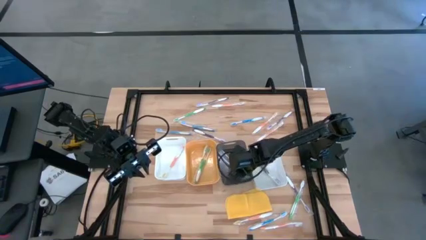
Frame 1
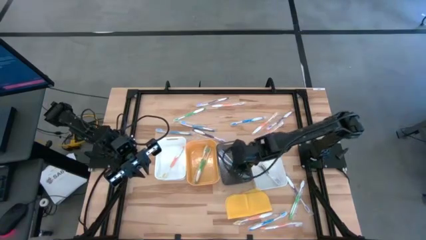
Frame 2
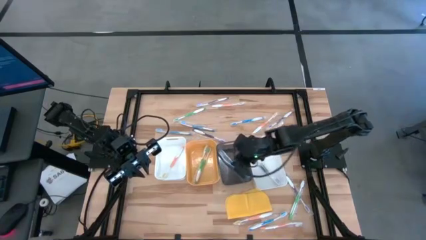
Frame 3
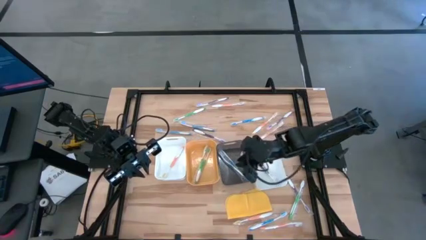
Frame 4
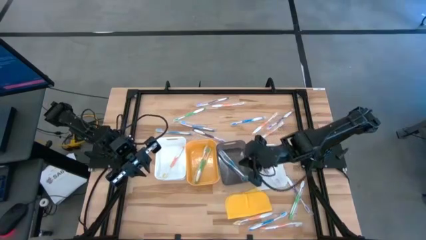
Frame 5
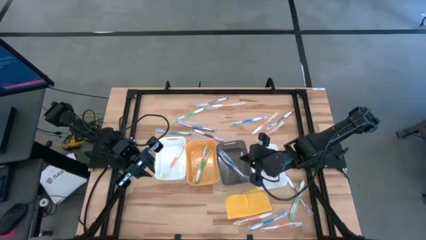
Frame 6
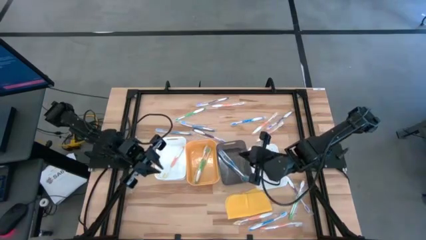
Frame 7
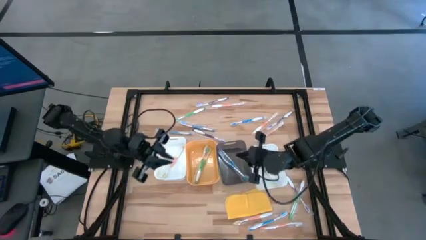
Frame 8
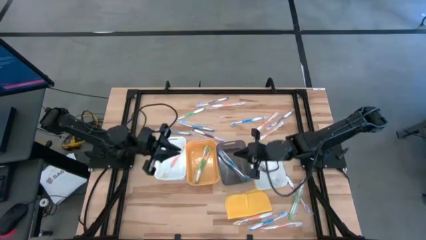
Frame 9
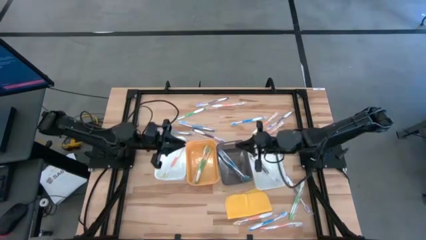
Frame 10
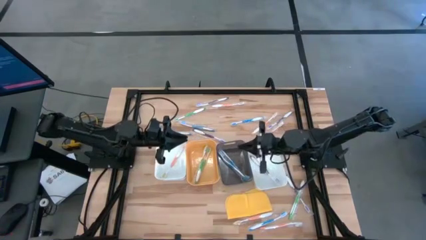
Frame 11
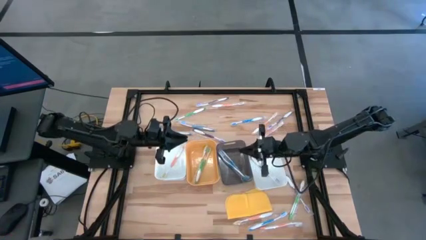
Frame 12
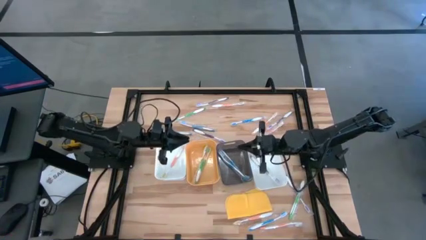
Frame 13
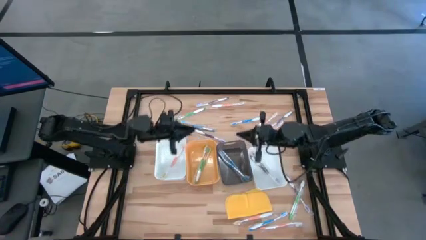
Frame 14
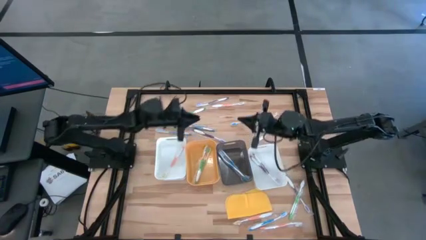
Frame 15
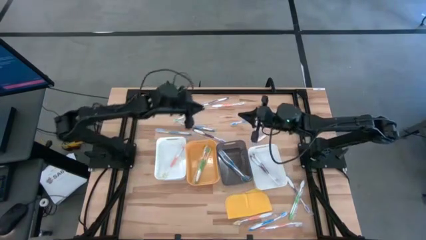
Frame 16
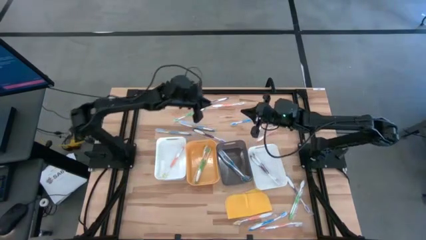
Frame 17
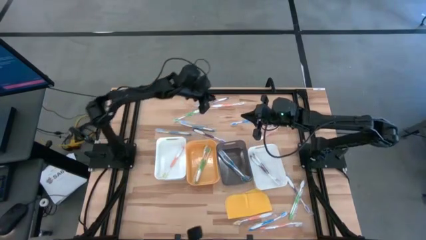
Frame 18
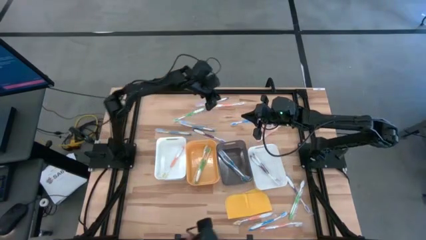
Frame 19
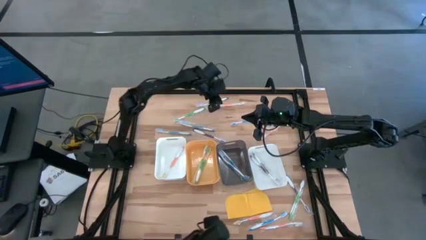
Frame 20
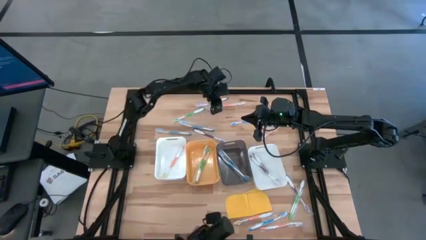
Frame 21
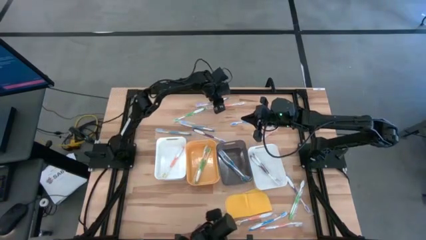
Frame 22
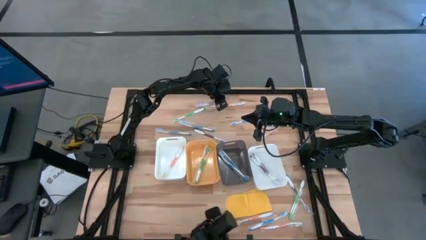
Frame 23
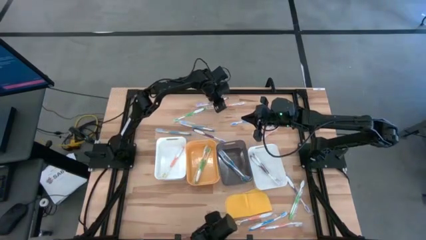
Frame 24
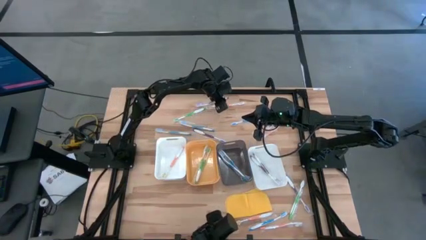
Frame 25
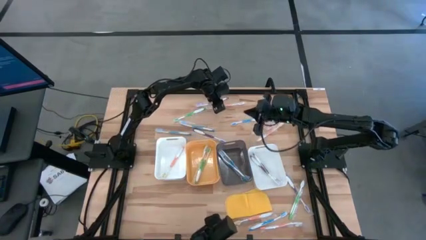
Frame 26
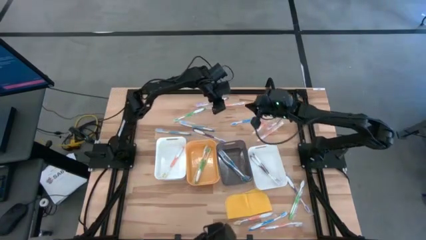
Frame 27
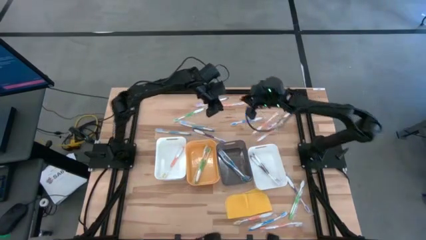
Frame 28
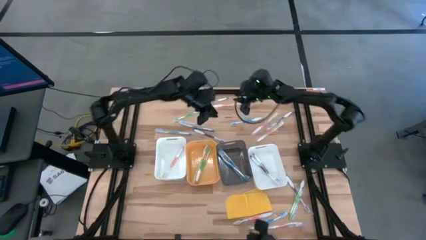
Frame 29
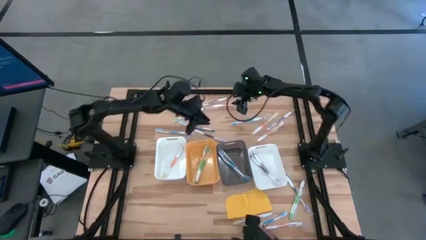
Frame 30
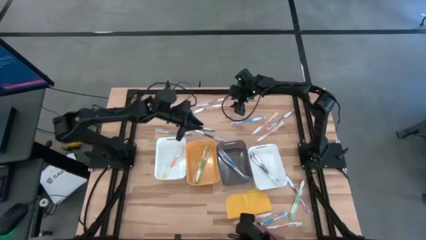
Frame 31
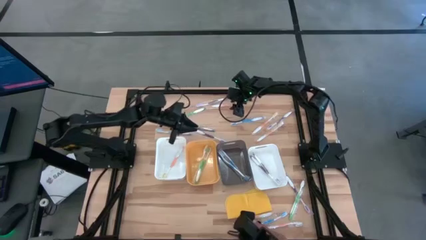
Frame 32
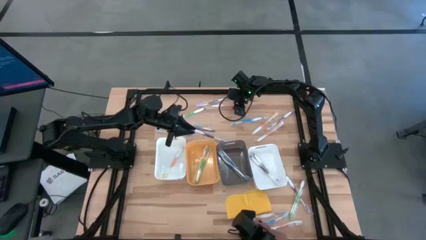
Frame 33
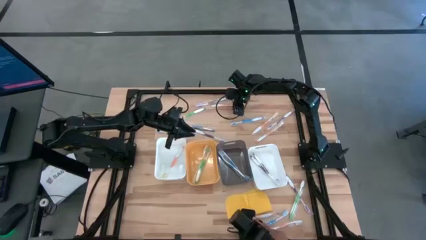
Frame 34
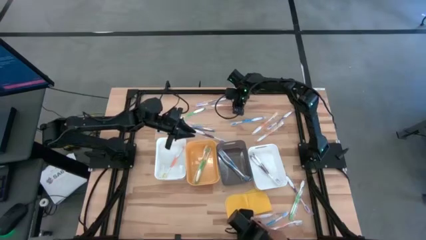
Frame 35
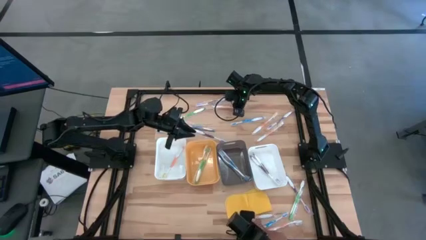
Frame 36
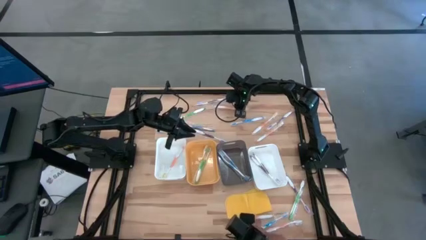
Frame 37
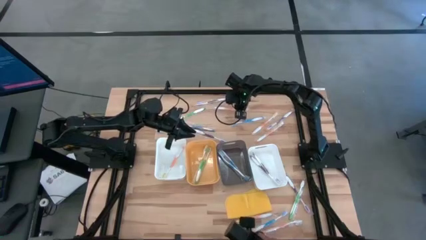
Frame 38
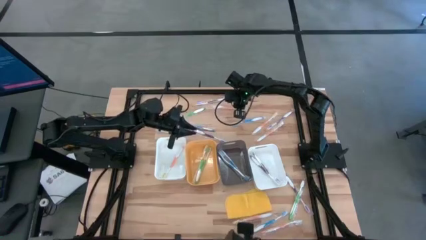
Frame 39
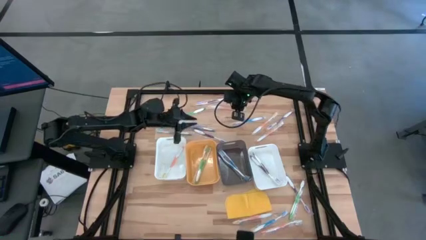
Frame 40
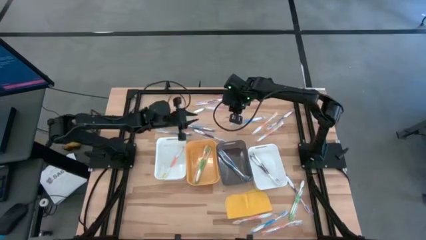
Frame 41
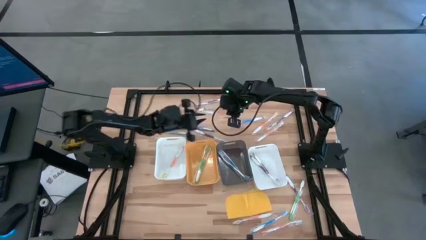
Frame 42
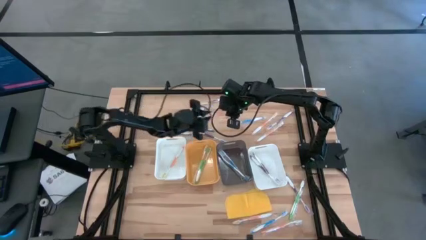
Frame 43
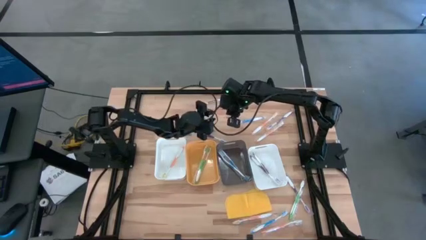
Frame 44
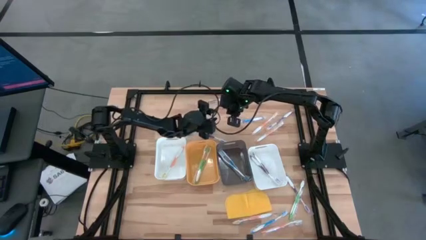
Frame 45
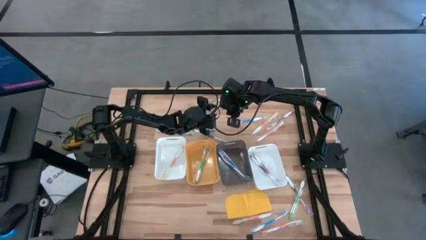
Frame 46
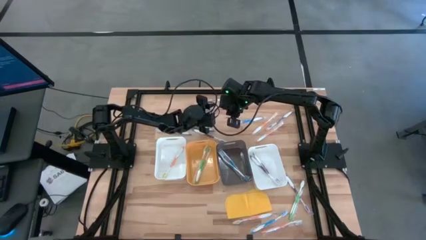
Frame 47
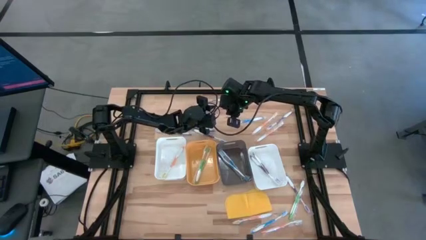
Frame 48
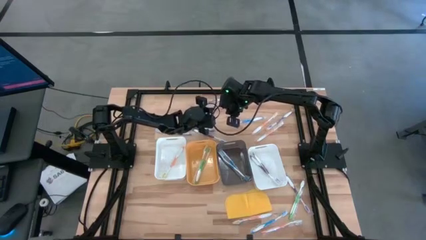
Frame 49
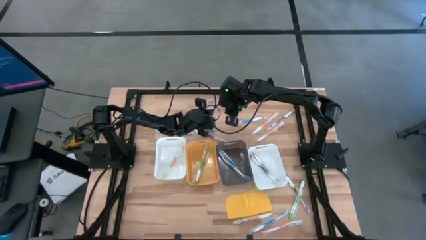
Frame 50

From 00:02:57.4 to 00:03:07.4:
Task: Pick & Place Toothbrushes
Put the orange toothbrush into the left white bin

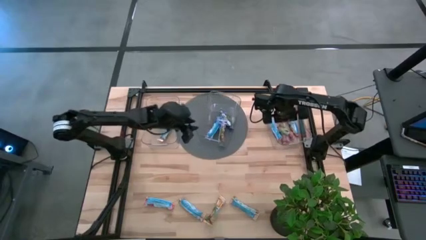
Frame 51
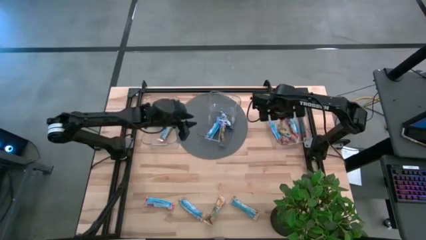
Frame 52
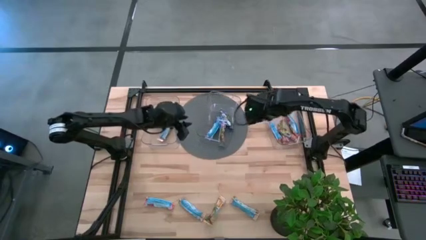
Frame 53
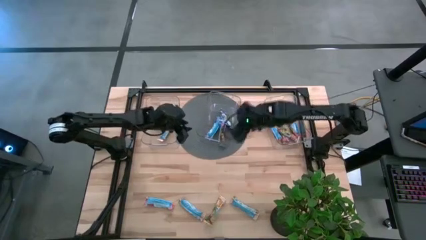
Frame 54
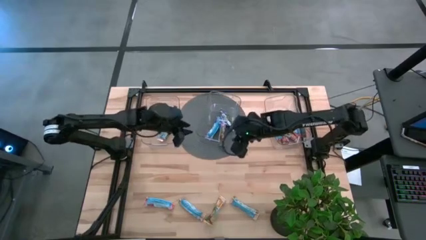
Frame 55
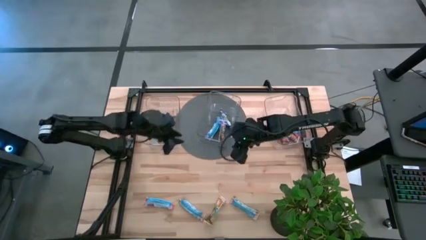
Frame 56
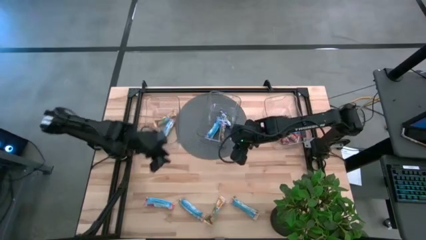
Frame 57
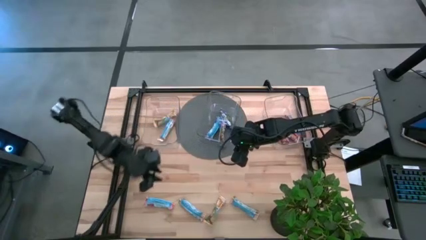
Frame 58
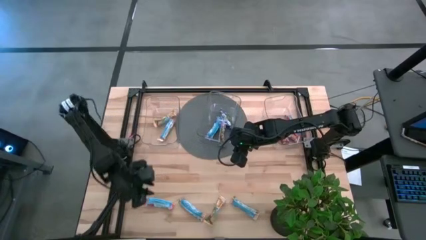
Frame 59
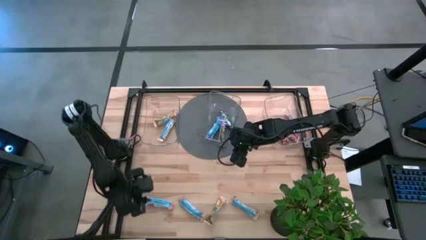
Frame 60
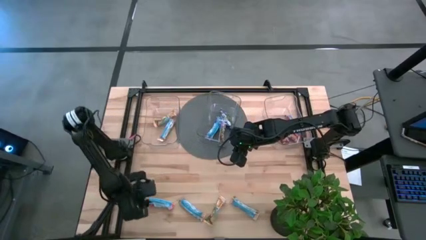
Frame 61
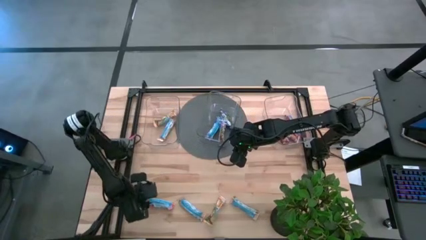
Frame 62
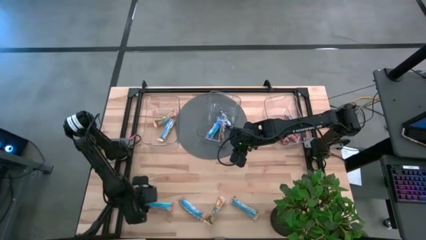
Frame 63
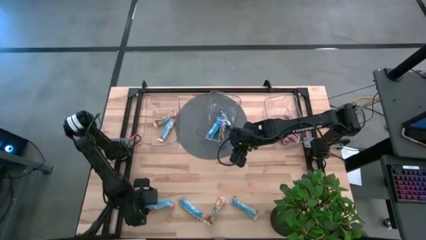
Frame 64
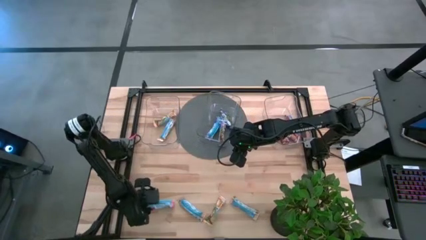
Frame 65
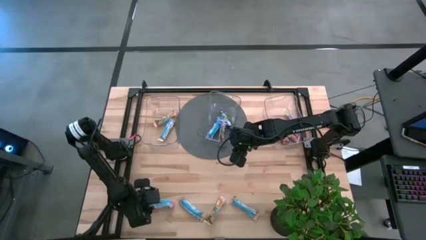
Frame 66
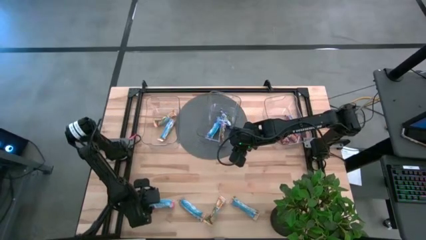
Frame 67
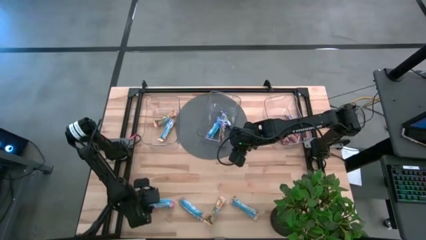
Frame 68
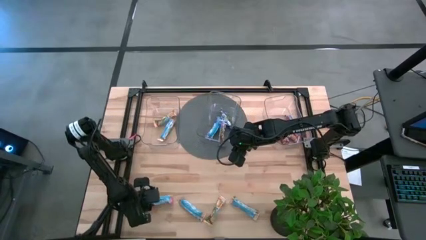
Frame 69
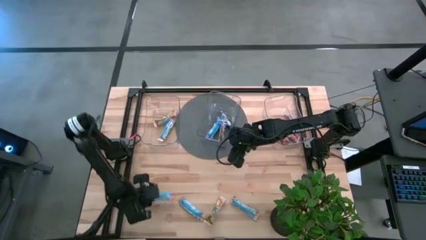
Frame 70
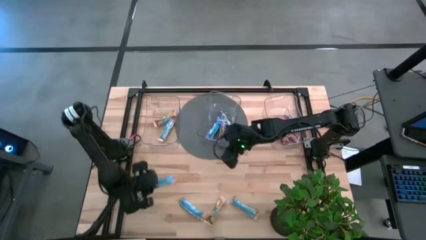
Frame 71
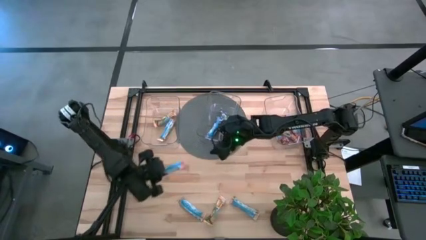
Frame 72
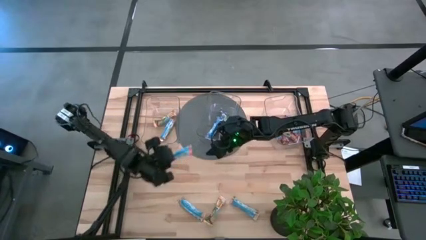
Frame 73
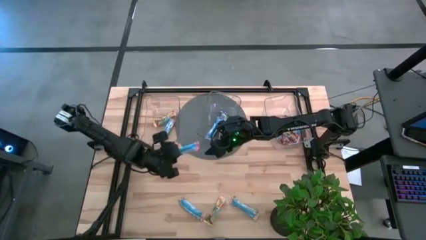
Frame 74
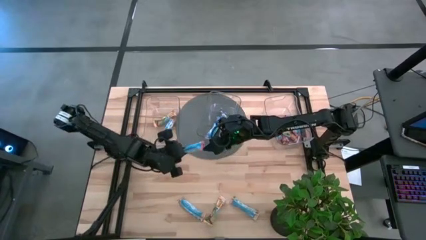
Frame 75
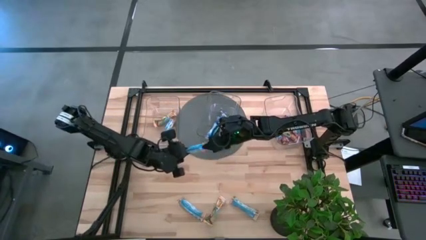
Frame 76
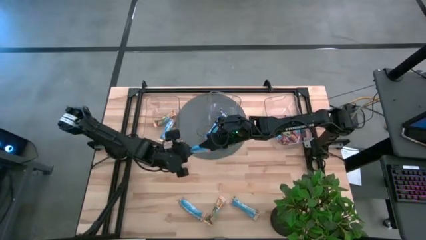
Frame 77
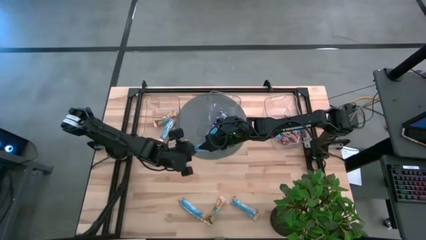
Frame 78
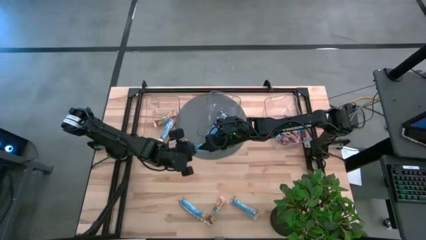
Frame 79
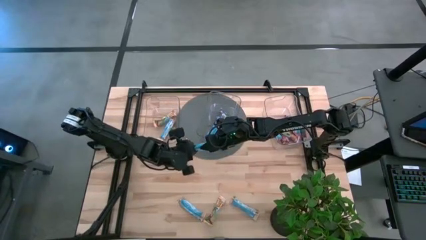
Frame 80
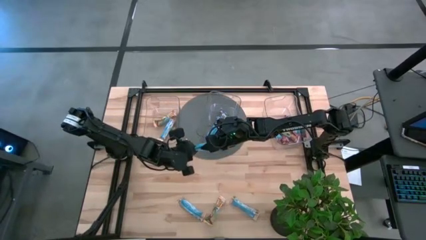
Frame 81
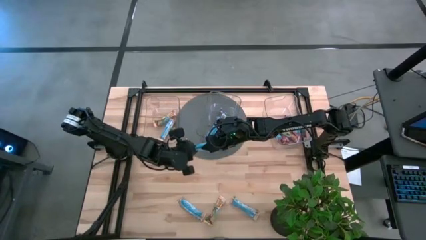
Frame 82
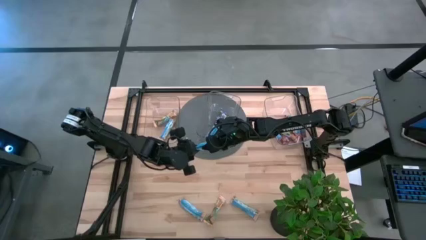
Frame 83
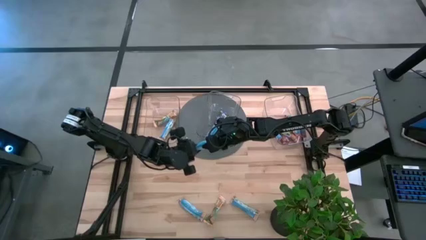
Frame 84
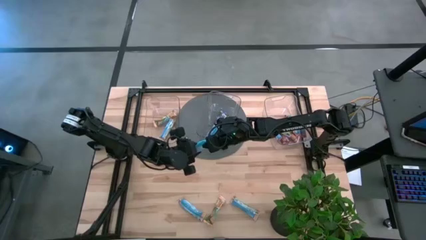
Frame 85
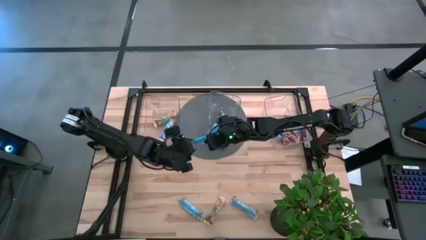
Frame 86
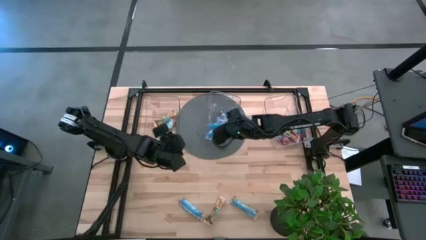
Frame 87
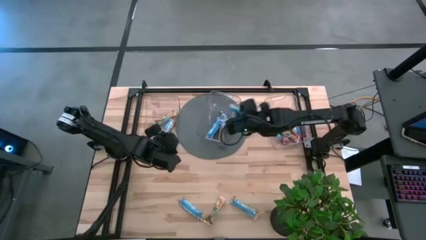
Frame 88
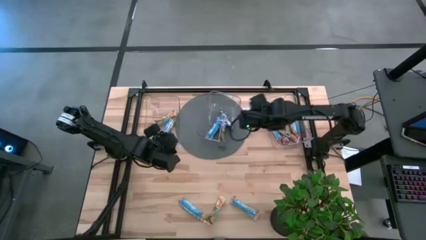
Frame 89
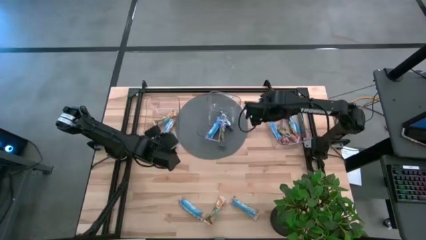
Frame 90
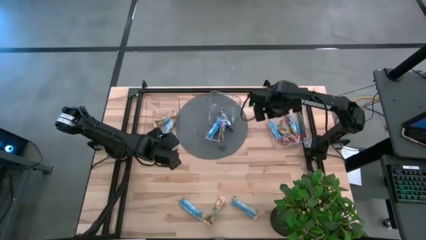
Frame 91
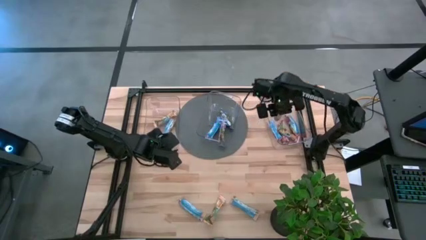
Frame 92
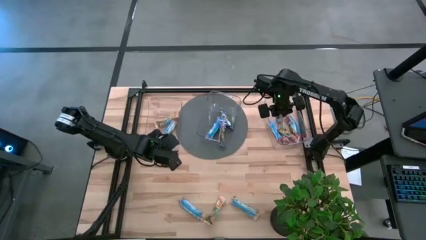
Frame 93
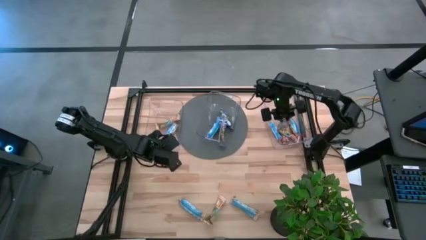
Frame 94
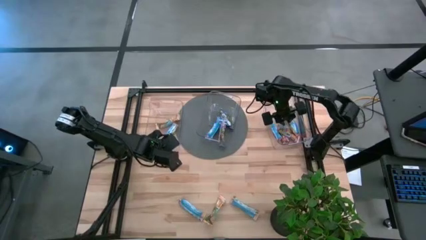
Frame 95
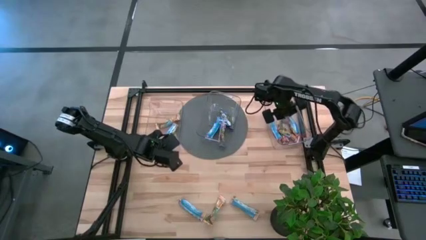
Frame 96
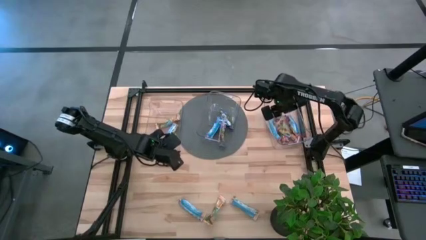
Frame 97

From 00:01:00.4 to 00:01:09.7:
Task: Pick and place Granola Bars by type
Put the red granola bar into the right transparent bin
